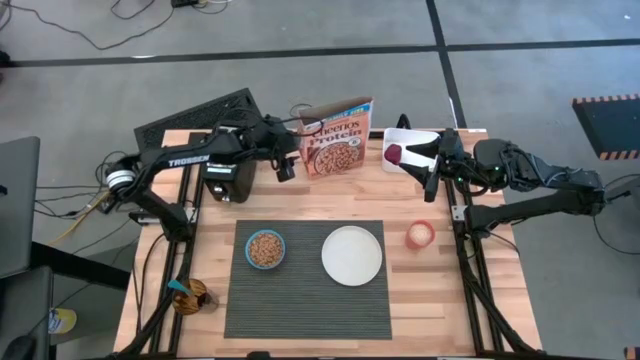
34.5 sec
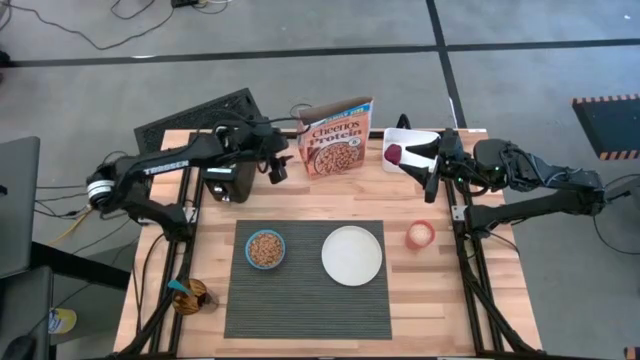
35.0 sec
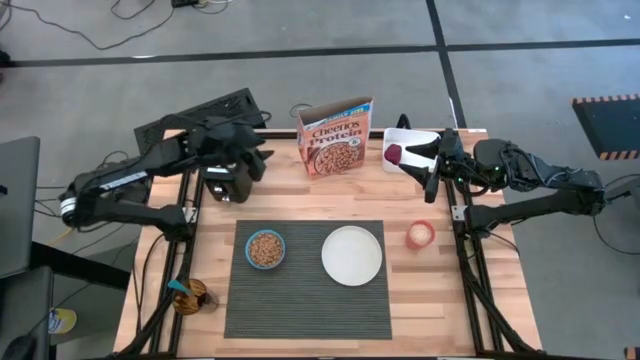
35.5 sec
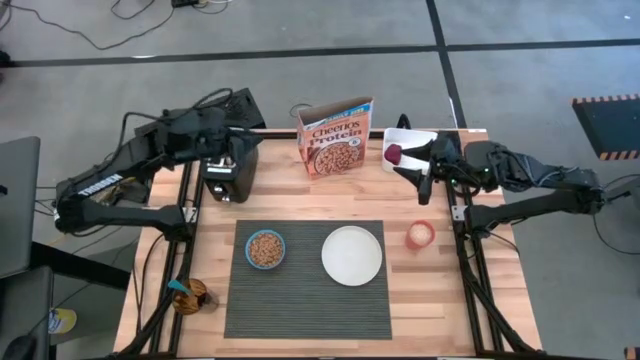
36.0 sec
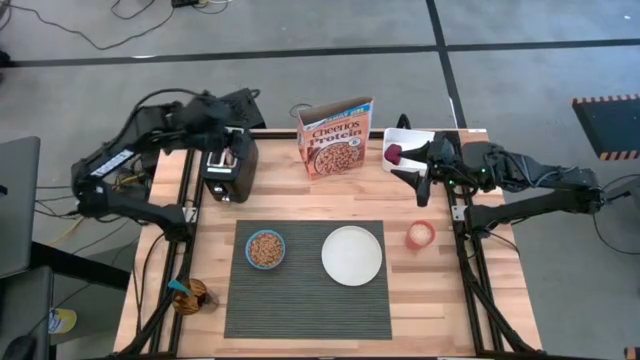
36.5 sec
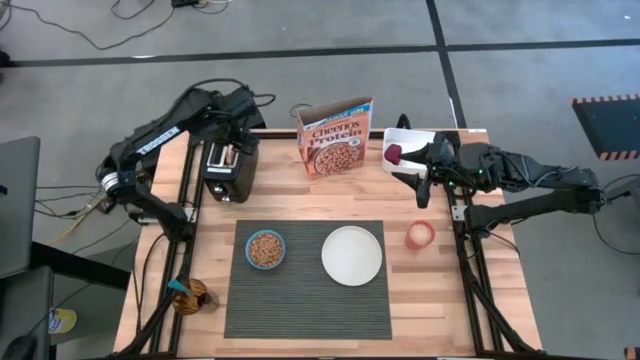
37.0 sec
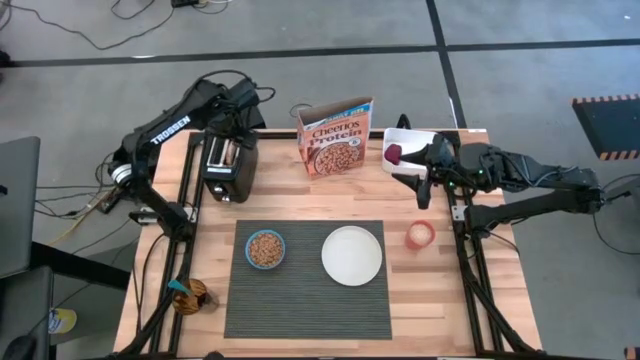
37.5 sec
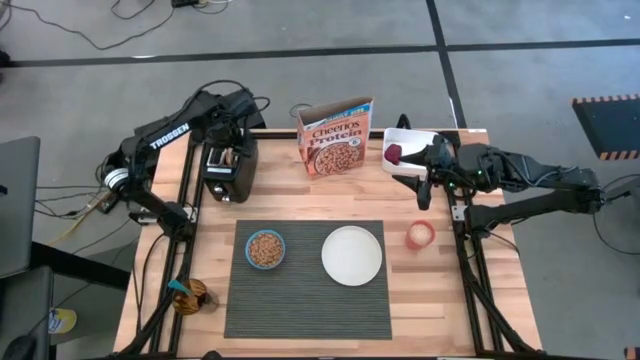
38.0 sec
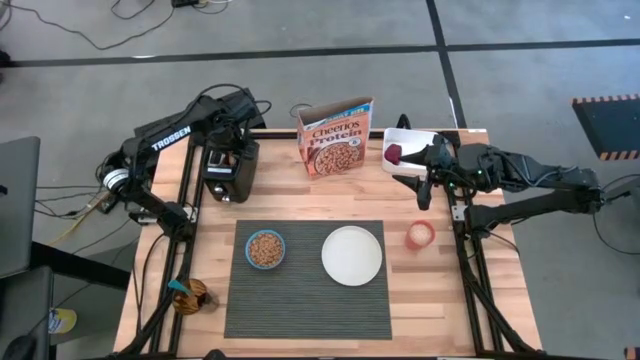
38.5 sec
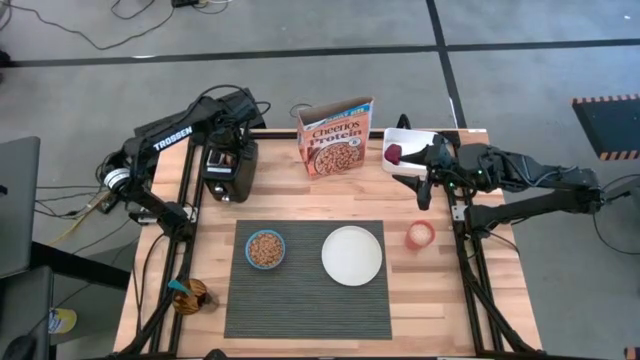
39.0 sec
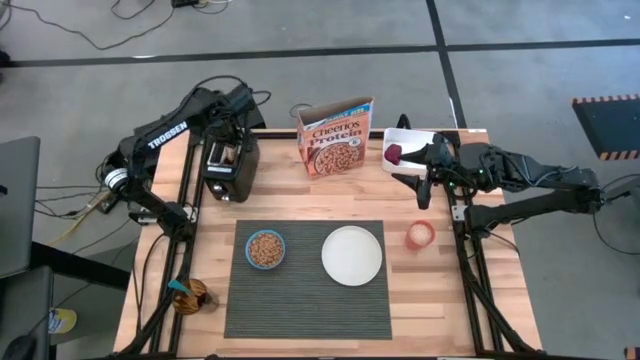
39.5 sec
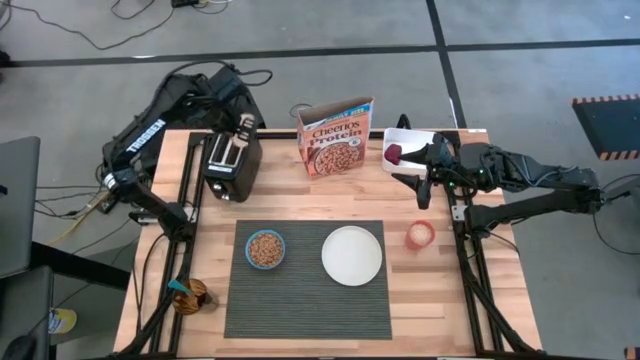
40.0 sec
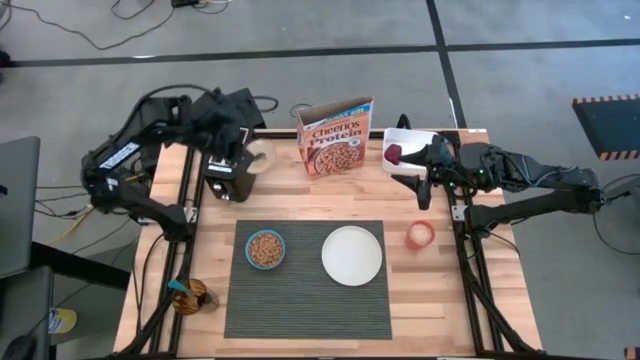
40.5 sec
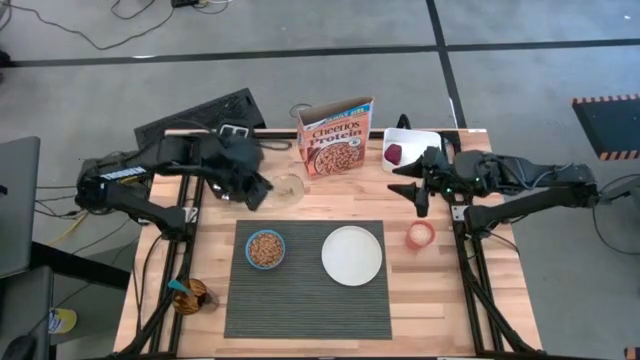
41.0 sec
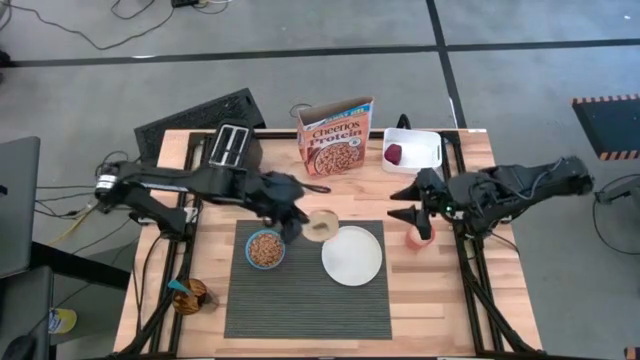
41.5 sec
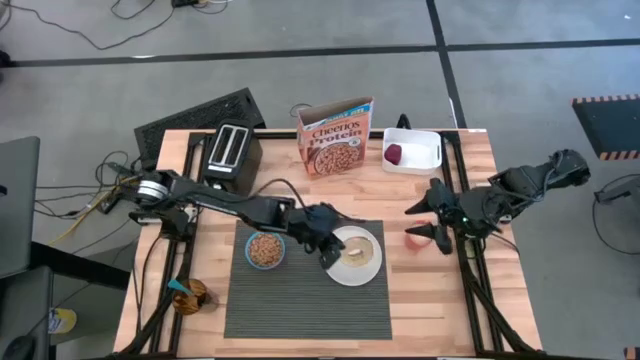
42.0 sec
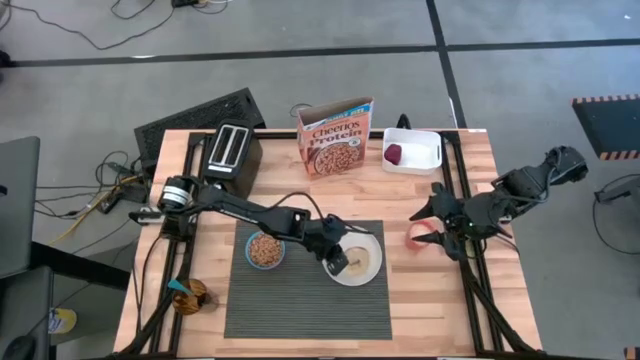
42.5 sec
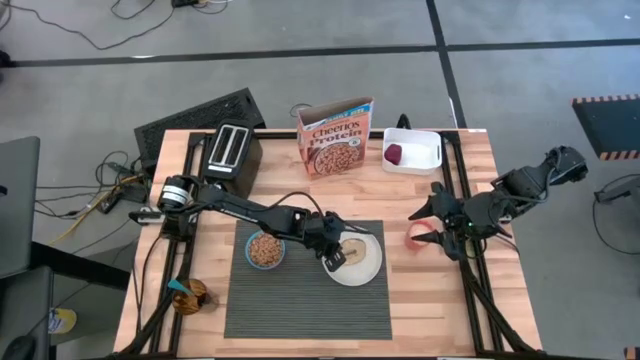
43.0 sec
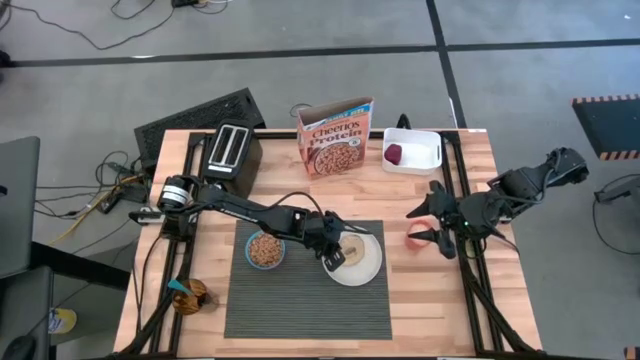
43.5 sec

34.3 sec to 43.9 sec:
Task: Arrange a breakfast setting
Put the toasted bread on the white plate

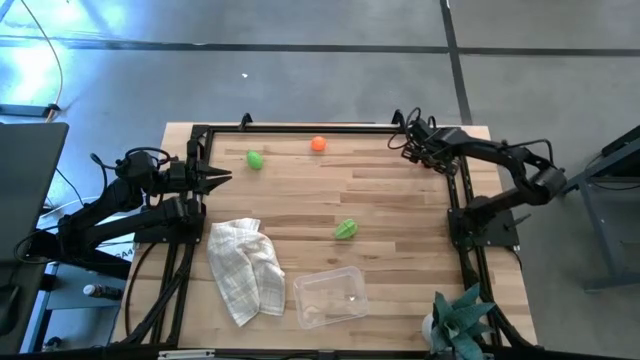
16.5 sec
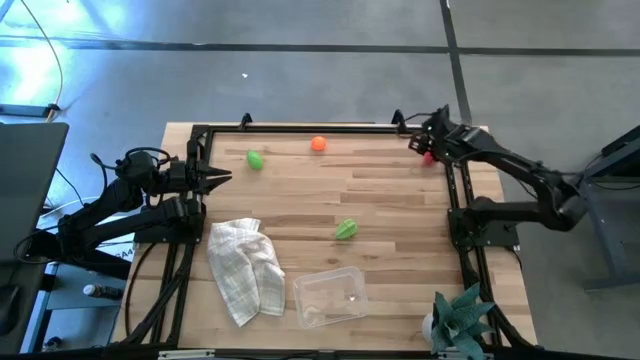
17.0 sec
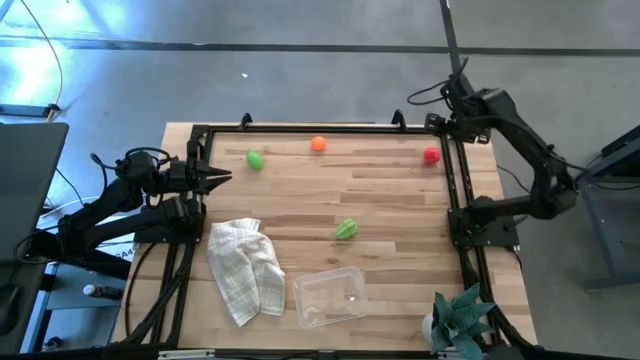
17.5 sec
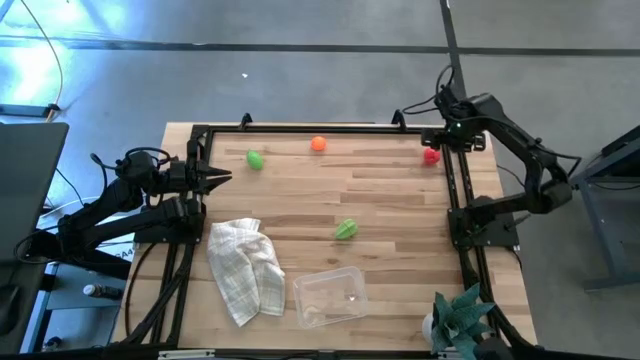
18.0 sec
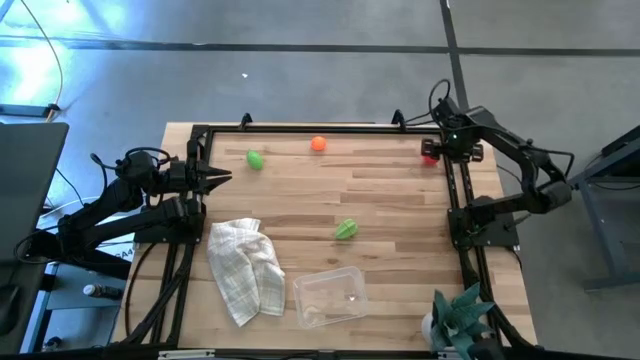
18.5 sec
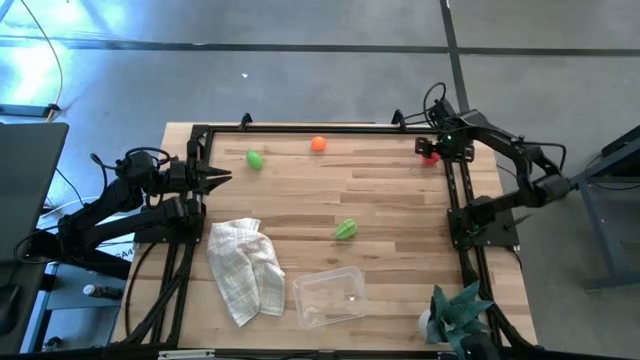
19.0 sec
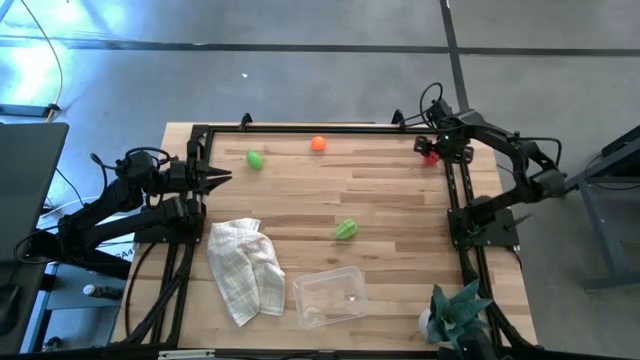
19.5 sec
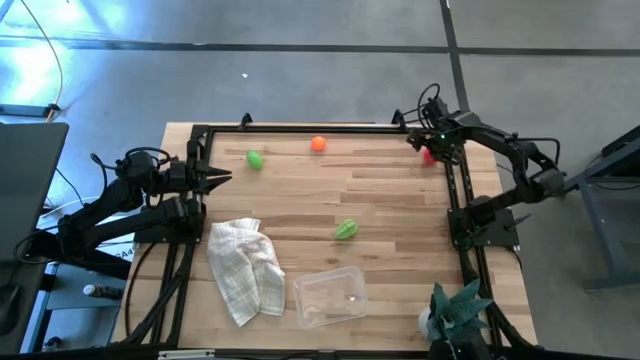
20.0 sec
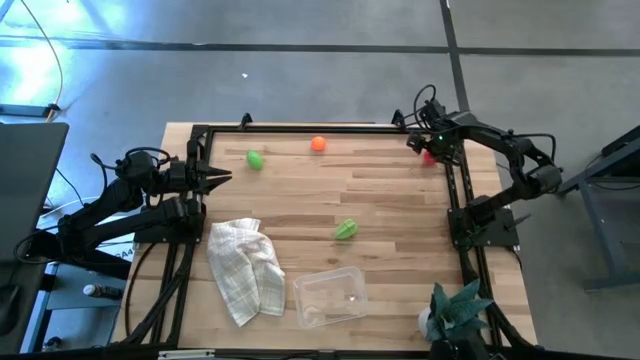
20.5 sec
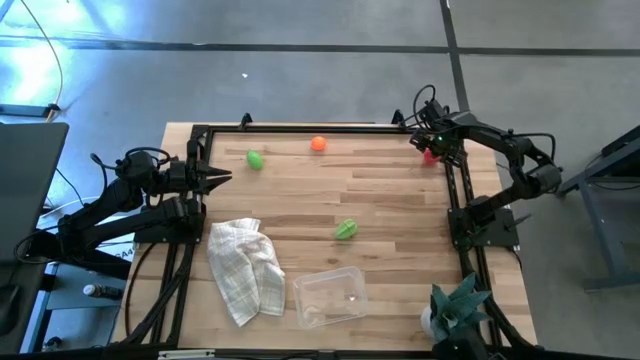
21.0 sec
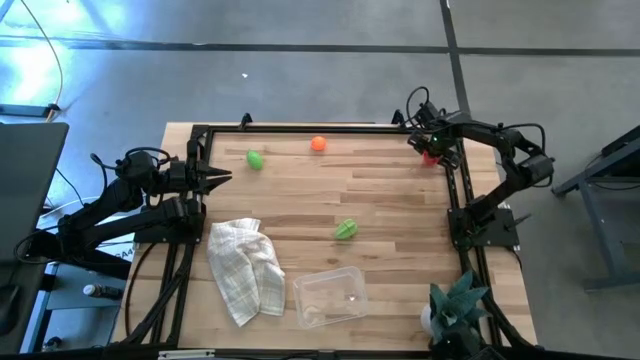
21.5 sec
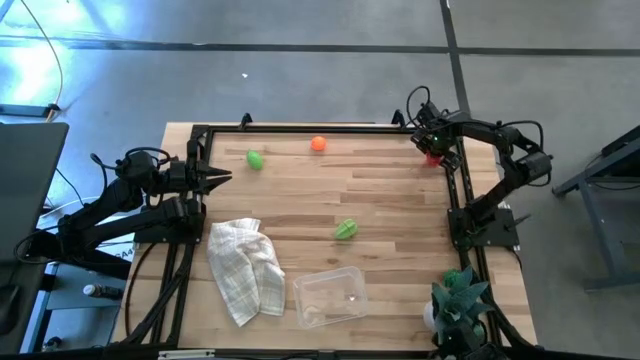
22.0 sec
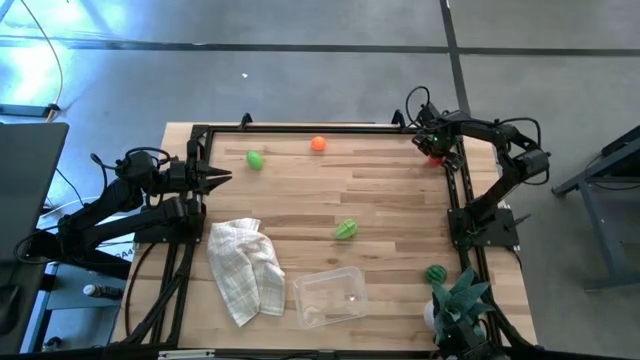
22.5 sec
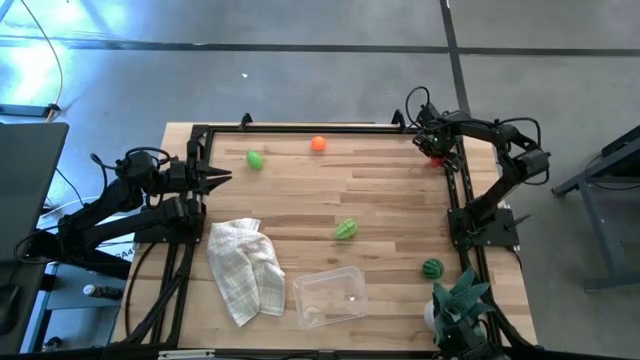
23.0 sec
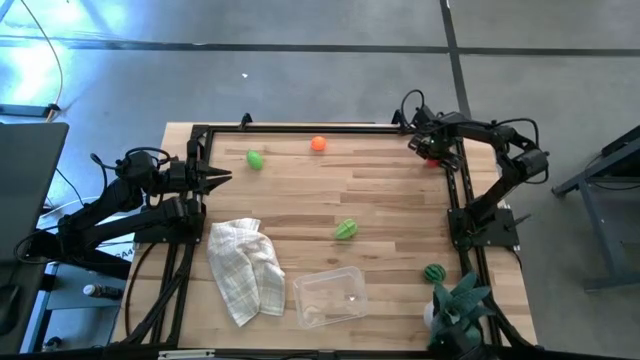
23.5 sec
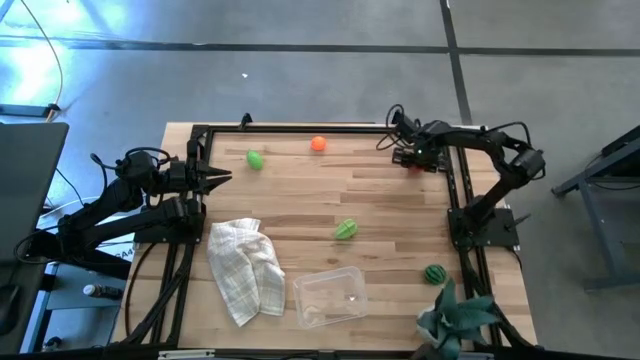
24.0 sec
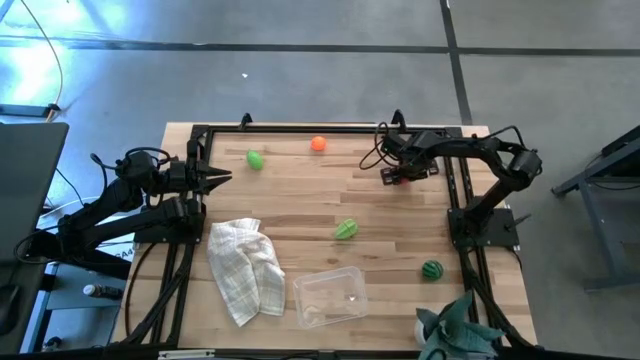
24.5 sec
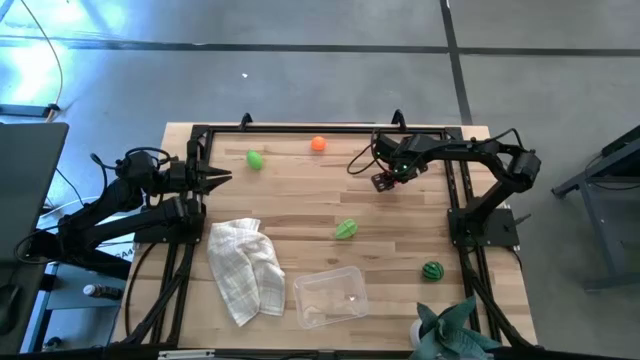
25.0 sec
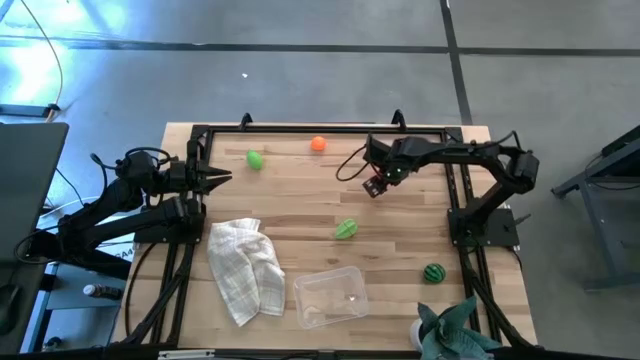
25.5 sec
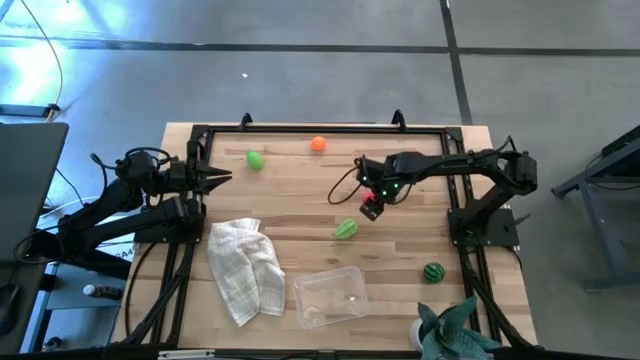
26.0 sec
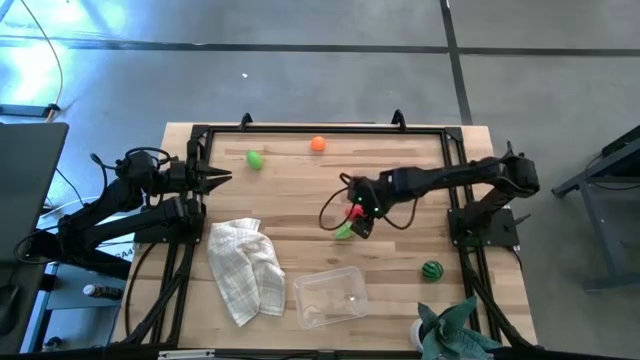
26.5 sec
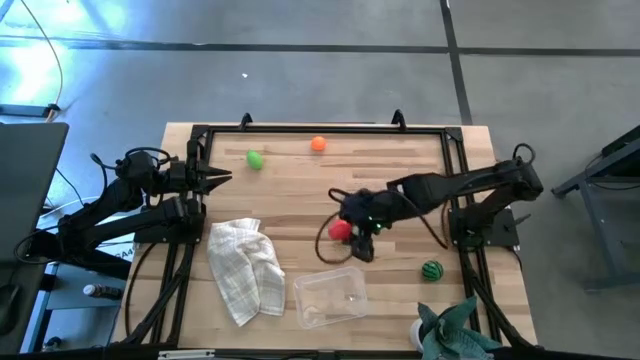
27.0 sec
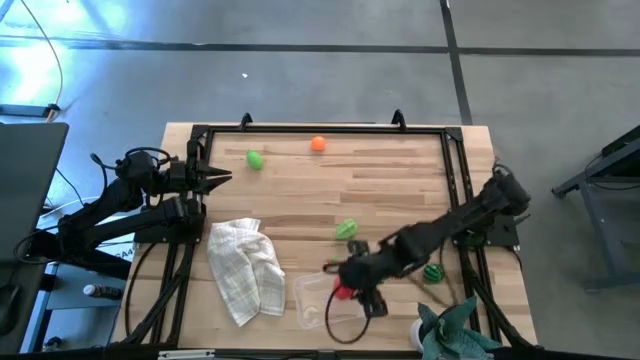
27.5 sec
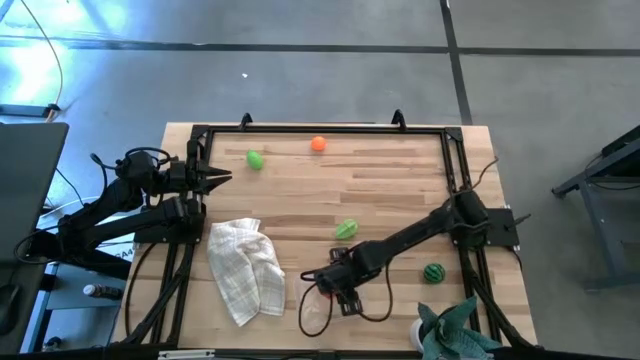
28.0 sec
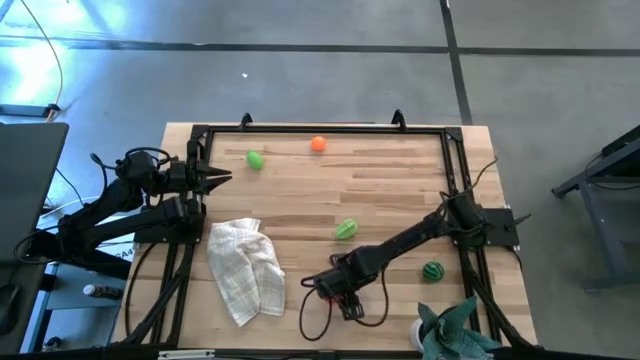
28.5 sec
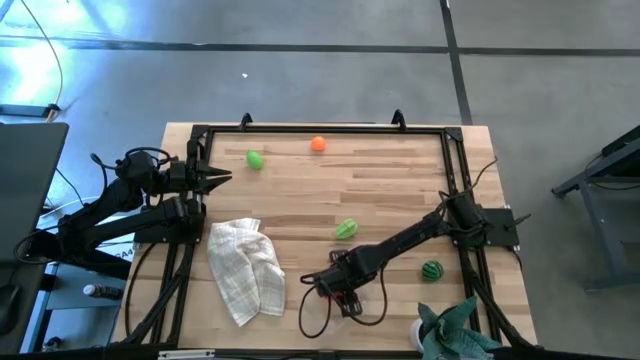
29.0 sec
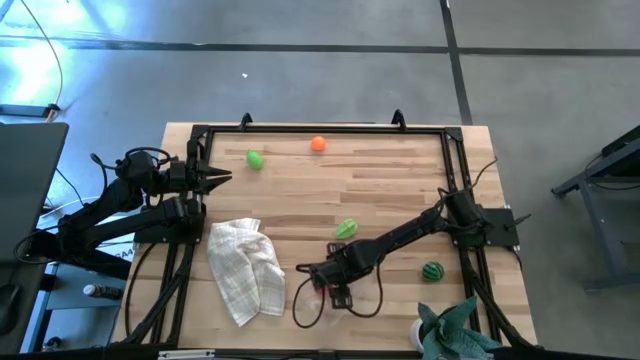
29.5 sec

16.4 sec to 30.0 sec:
Task: Pick and placing Produce into tupperware
Put the red apple into the transparent bin
